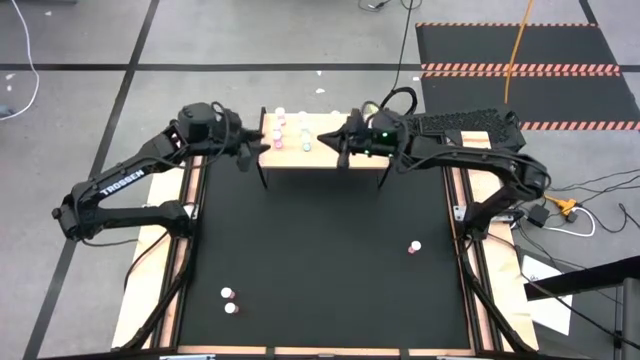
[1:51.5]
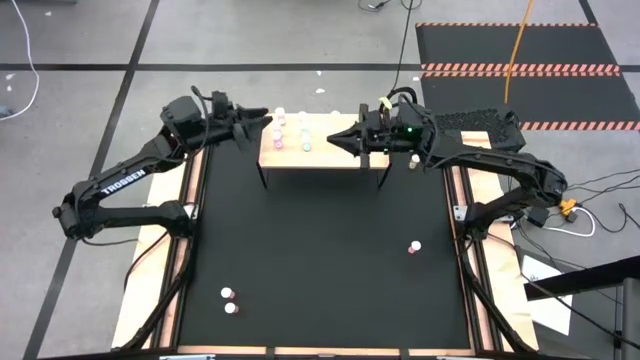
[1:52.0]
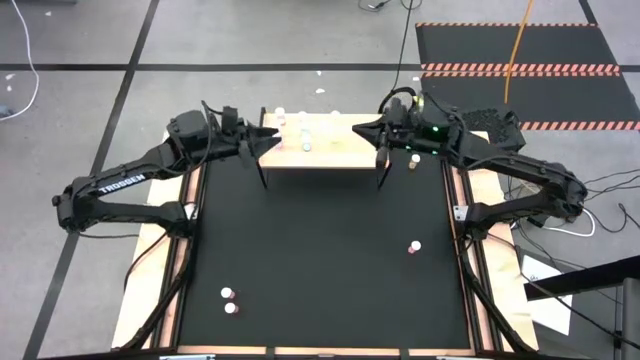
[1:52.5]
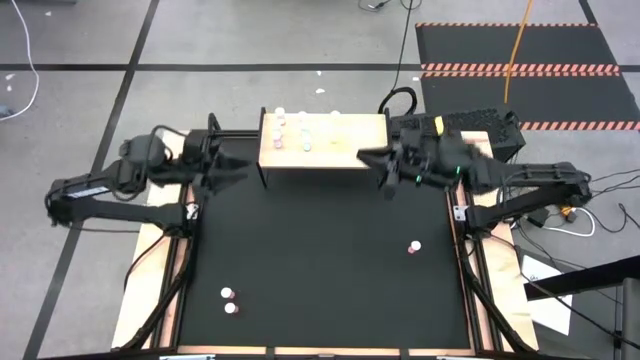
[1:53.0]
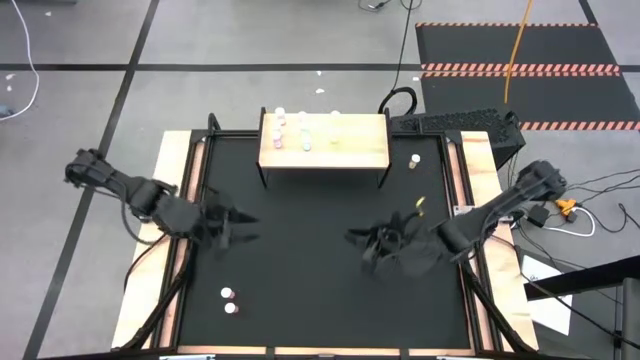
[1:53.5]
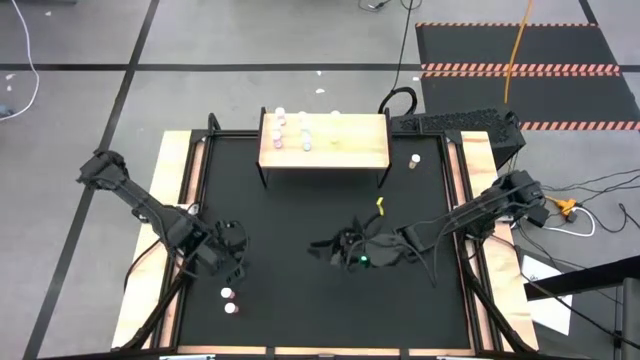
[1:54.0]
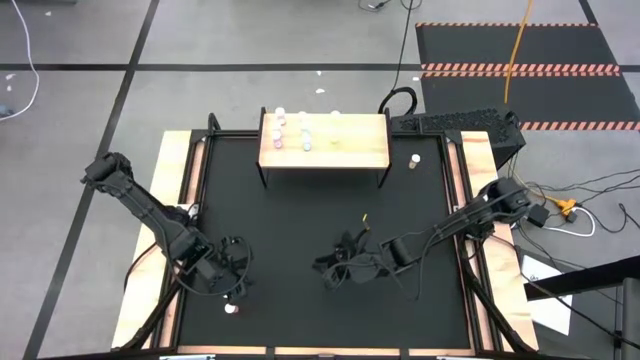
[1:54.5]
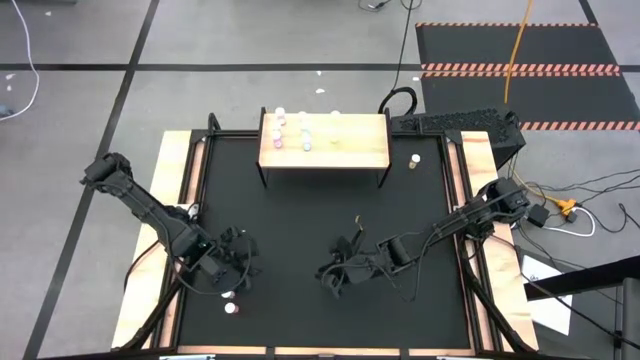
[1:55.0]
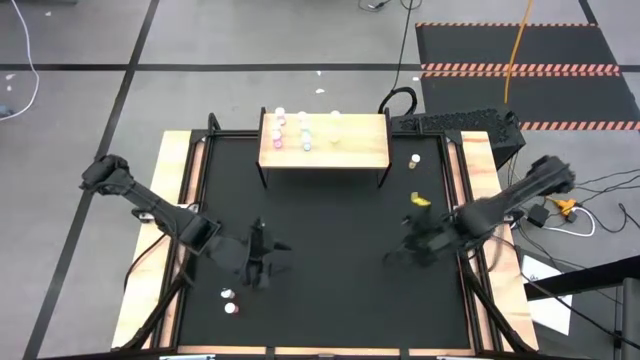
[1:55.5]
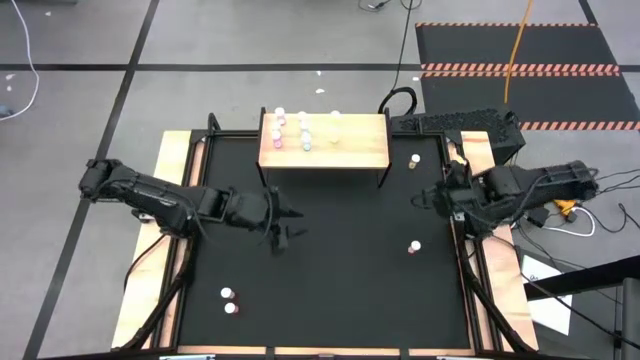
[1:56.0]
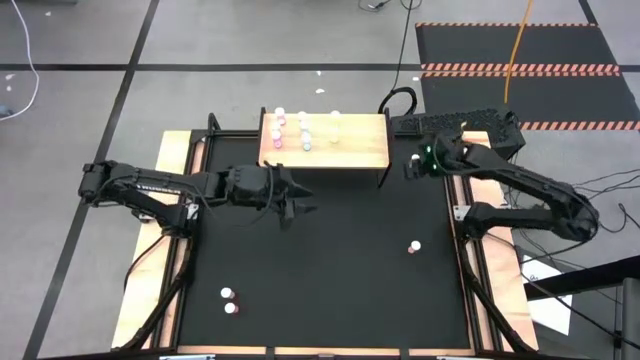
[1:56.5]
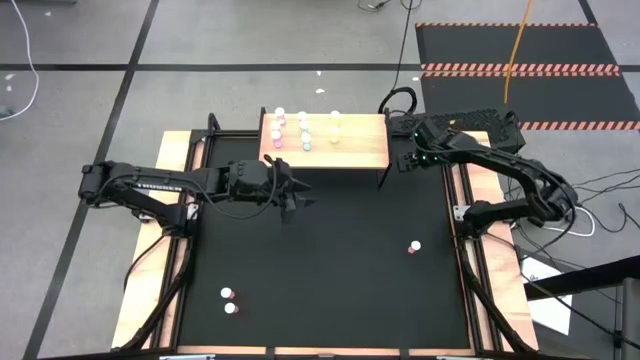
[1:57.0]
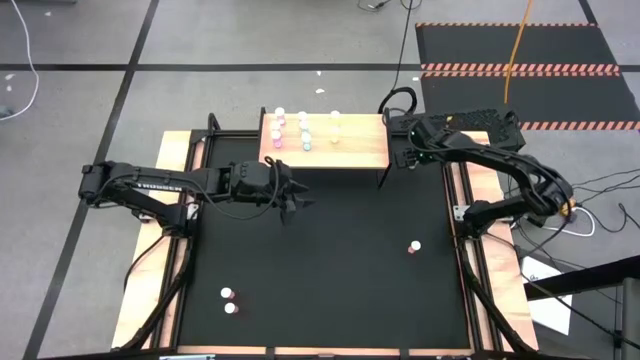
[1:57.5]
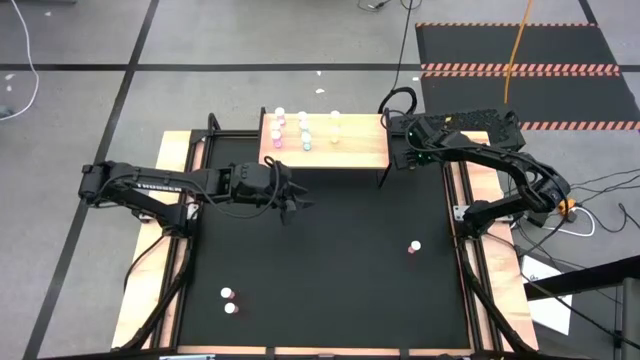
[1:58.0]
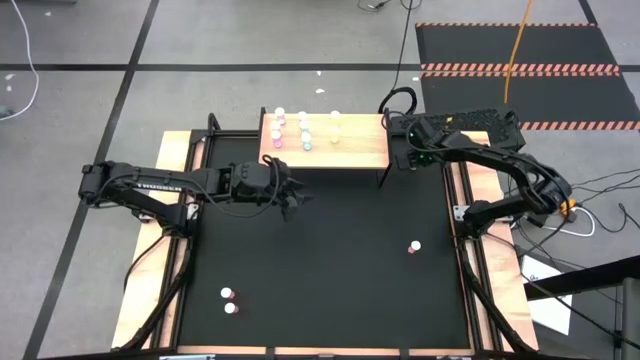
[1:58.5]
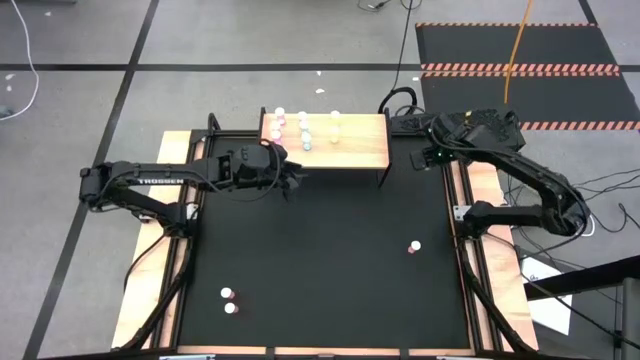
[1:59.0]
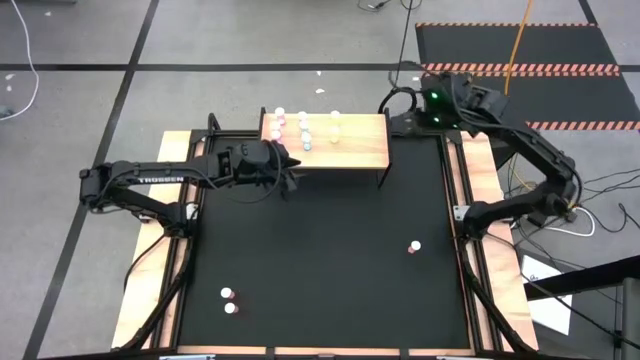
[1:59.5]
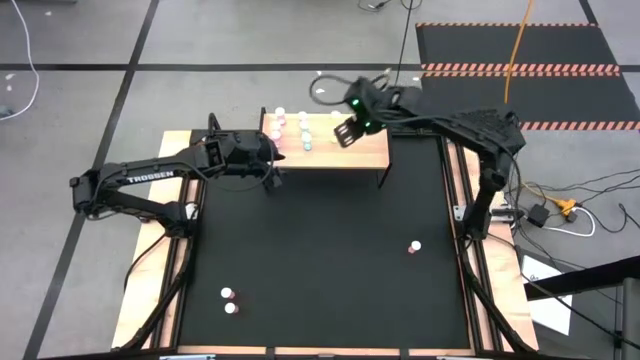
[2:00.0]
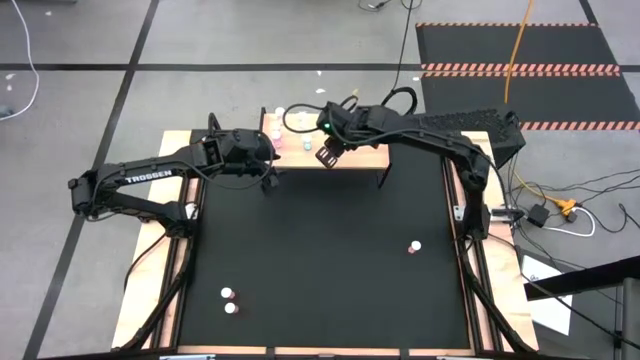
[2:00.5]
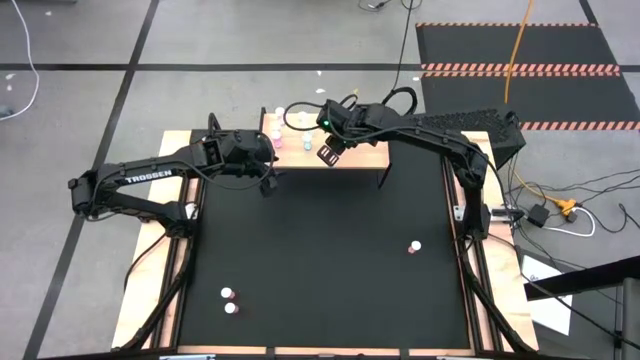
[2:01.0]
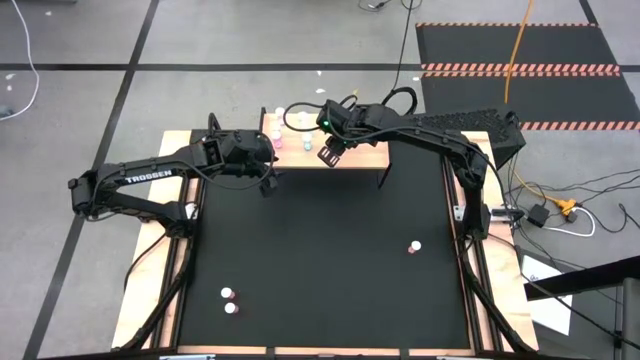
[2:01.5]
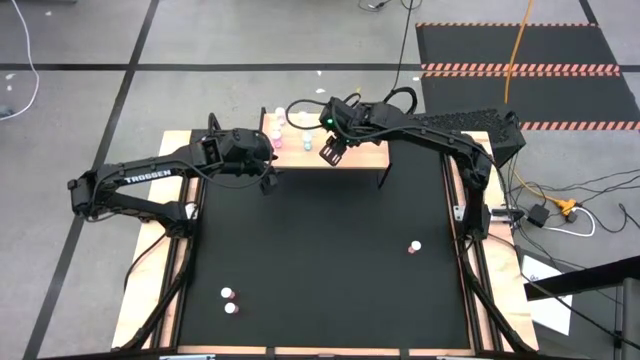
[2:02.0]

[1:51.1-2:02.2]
Task: Pick and place medicine bottles onto shelf by color
Put the yellow pill bottle on the shelf aligned with the other yellow pill bottles

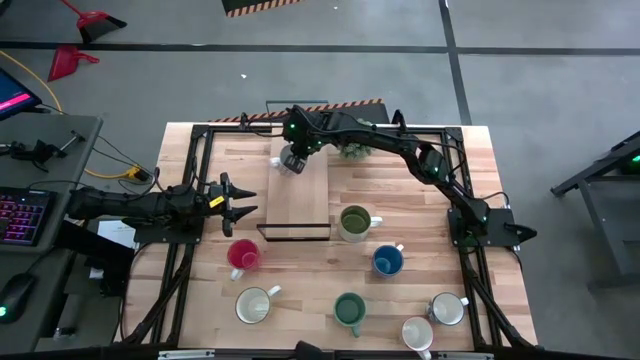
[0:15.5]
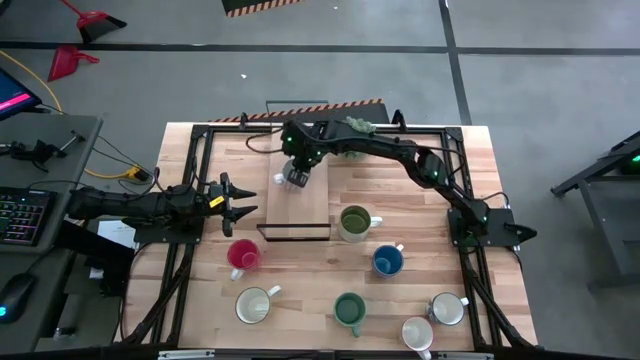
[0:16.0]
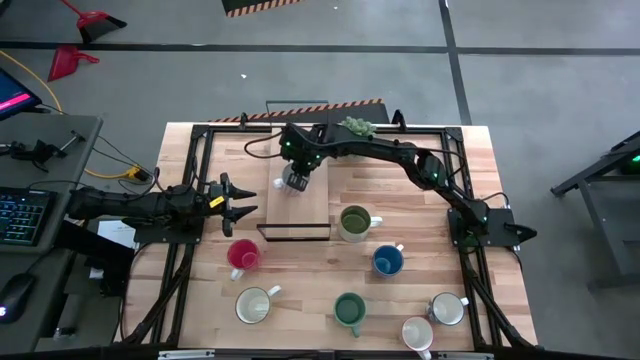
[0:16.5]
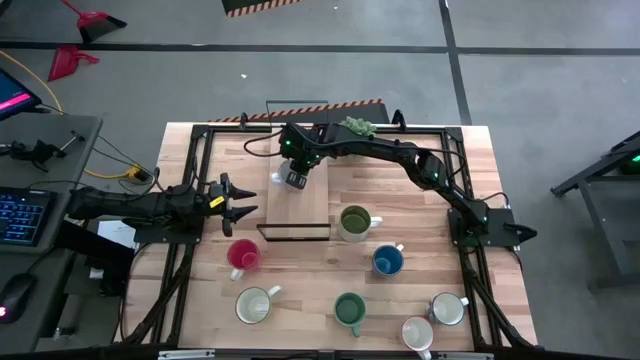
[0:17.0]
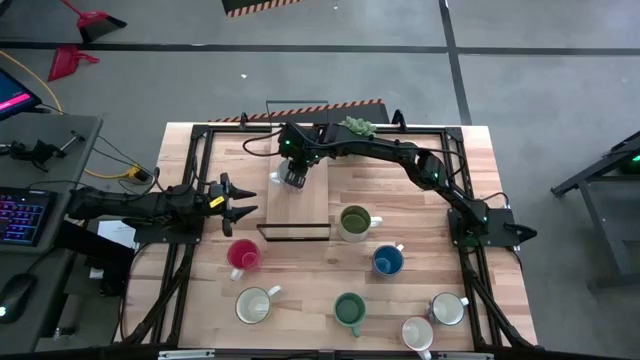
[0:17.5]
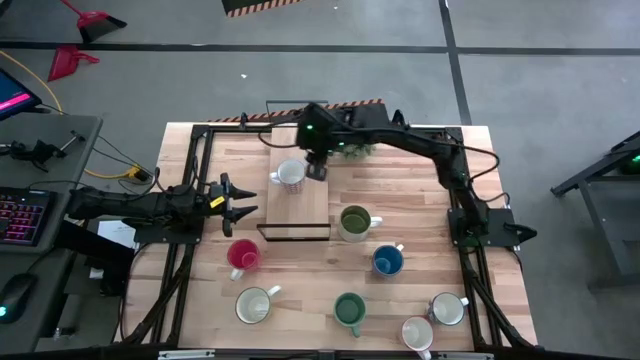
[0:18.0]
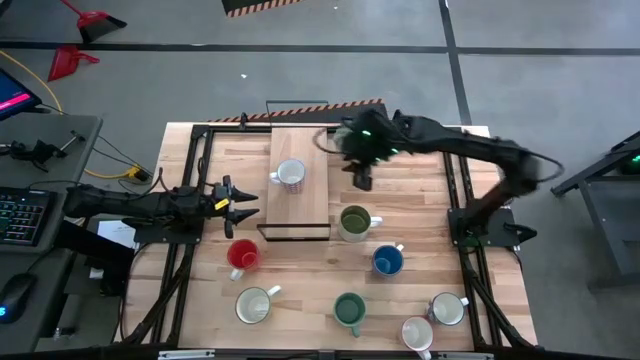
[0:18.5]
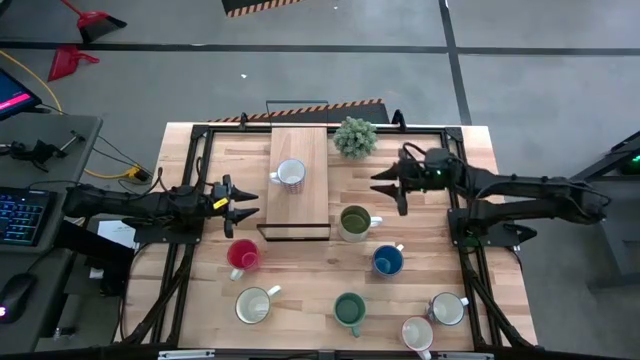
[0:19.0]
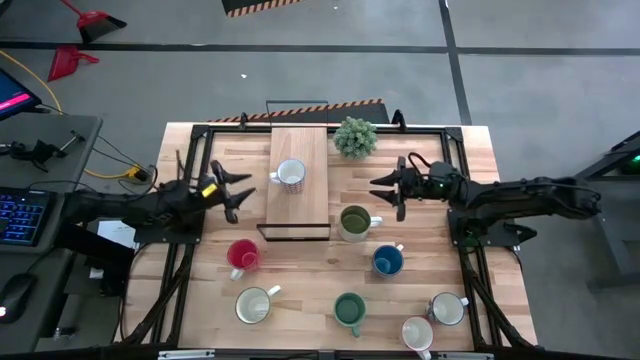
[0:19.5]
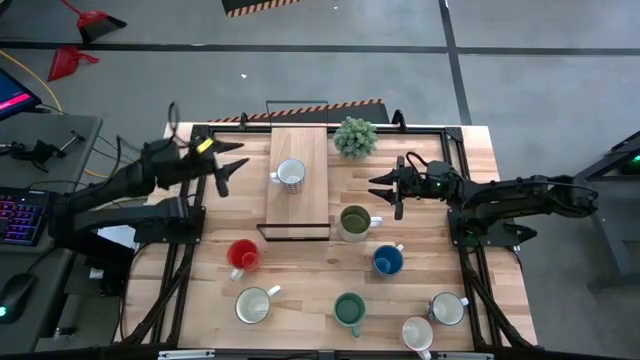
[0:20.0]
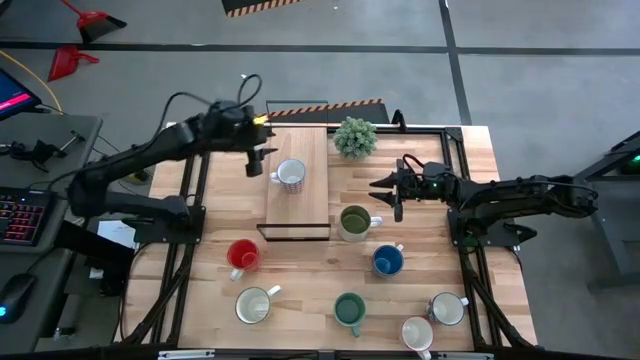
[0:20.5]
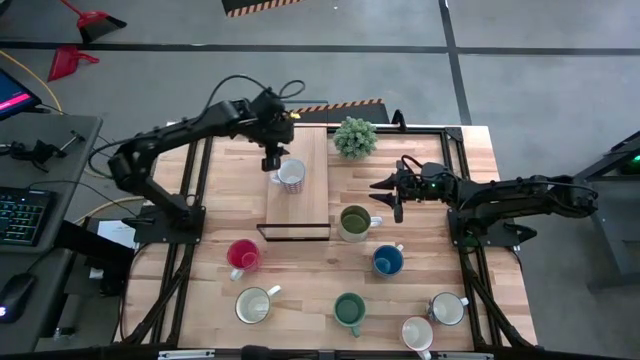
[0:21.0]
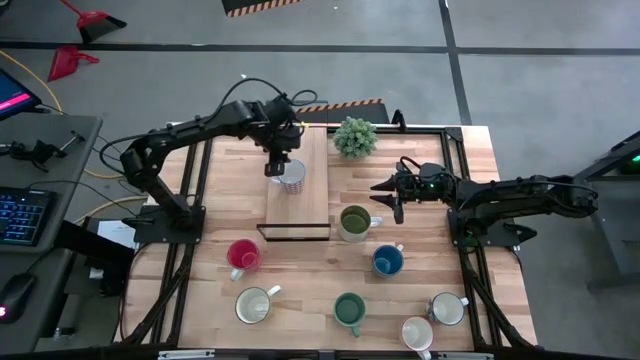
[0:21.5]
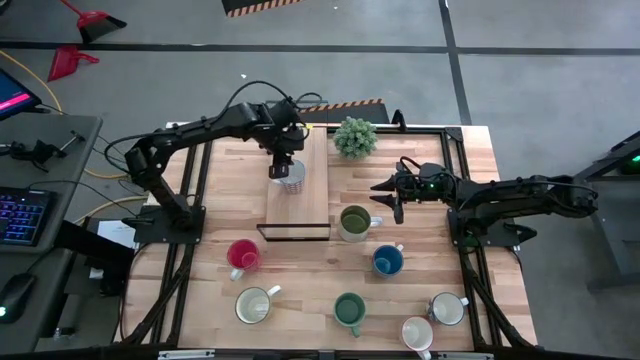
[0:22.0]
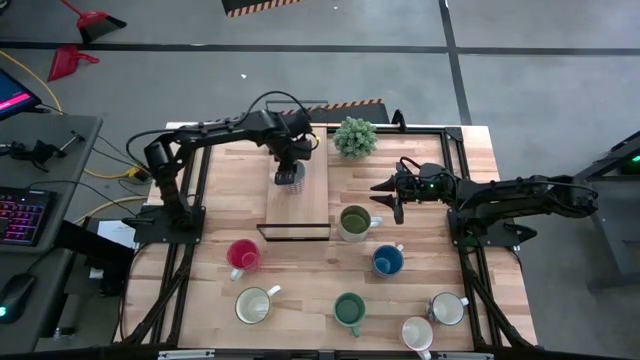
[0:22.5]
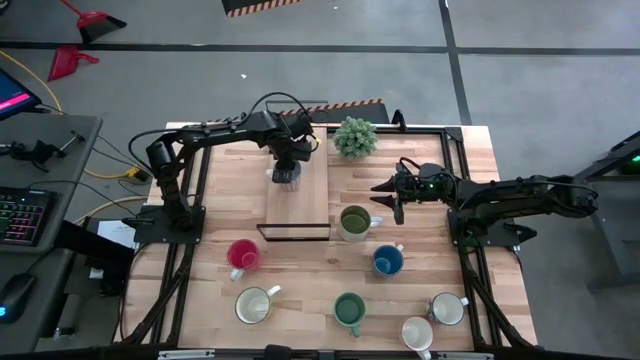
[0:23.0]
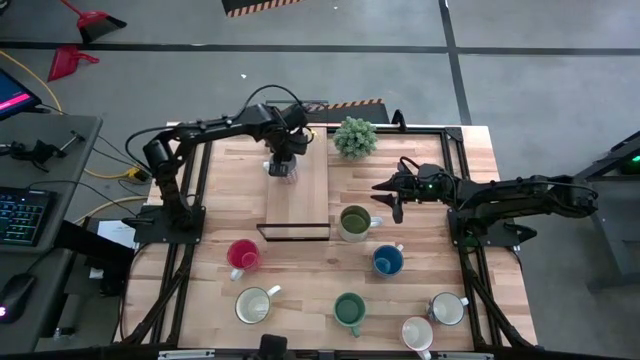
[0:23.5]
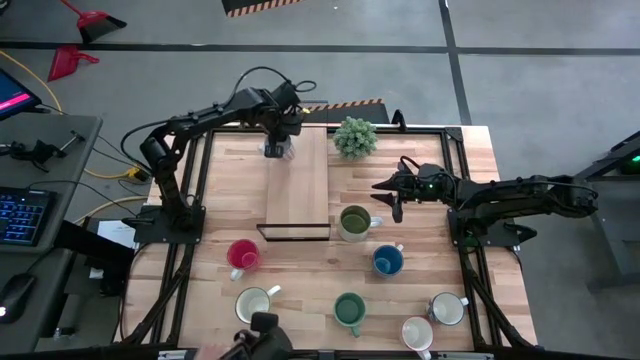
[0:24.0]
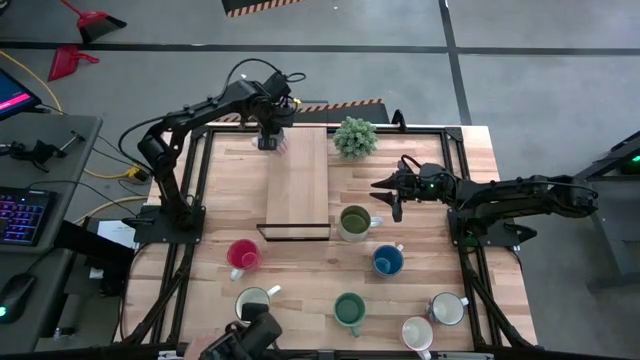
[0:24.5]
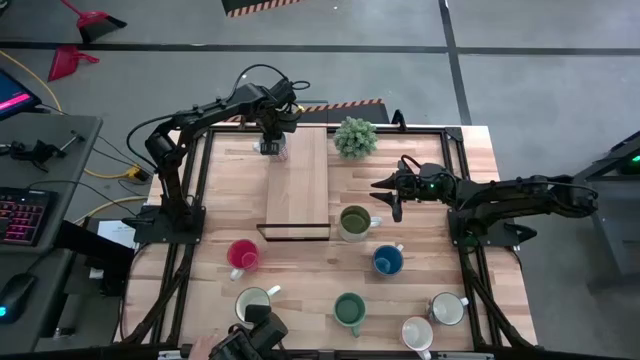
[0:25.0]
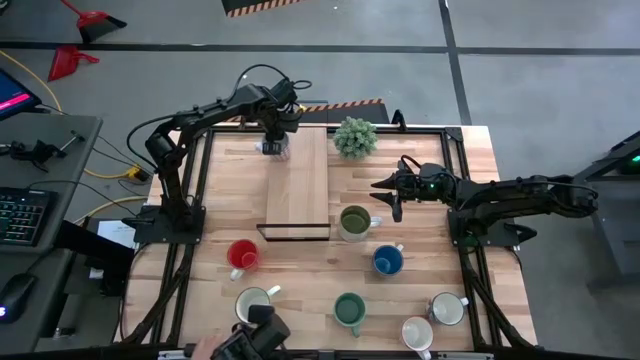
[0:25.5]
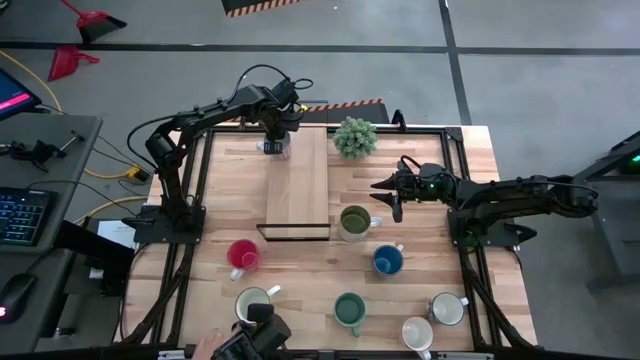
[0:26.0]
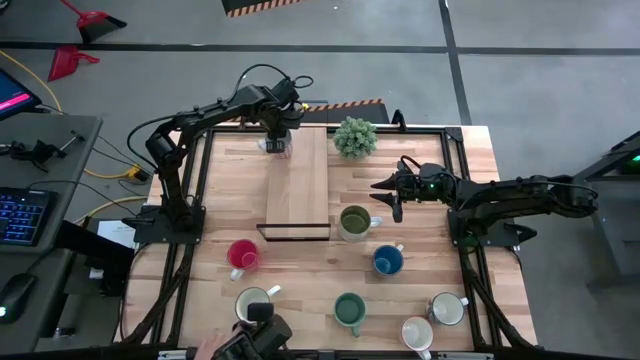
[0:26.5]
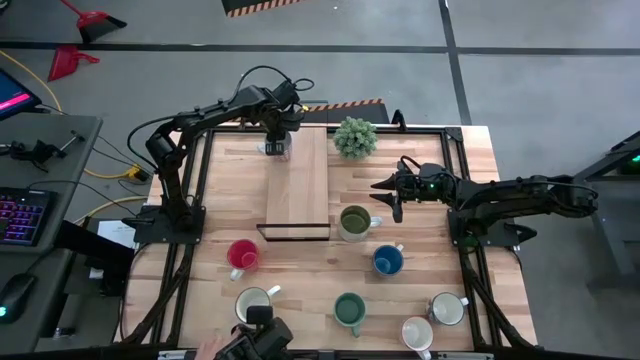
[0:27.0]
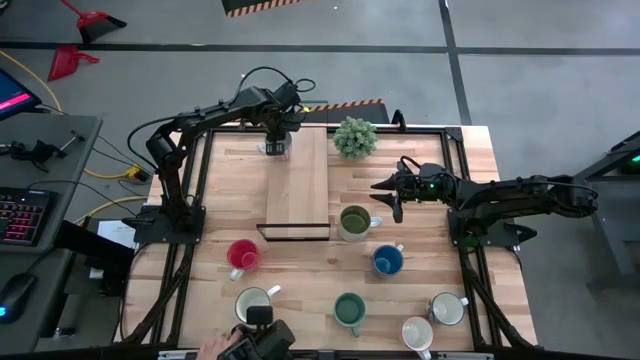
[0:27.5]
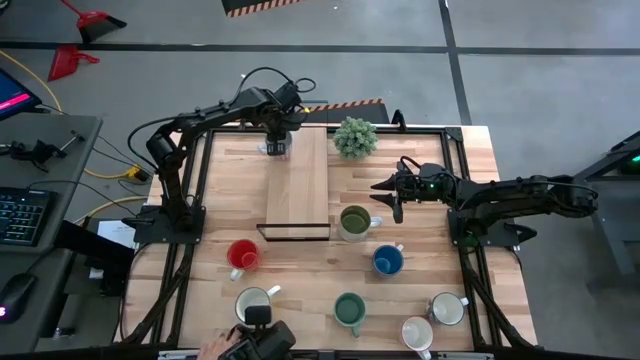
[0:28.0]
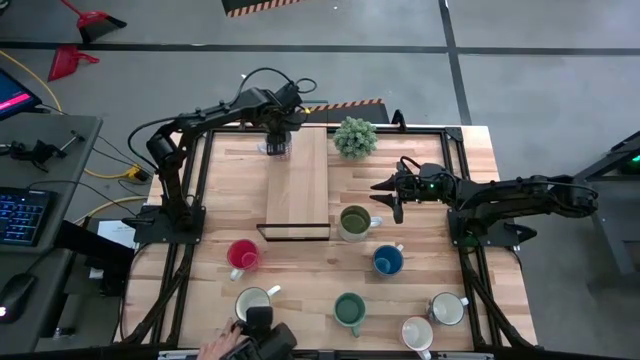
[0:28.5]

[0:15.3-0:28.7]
Task: Place coffee mugs
Put the red patterned mug on the shelf
